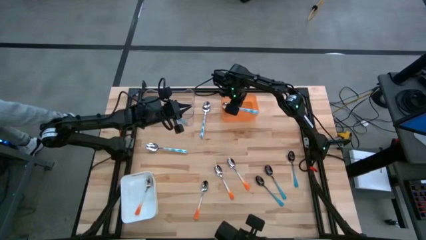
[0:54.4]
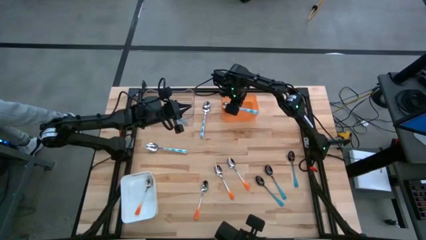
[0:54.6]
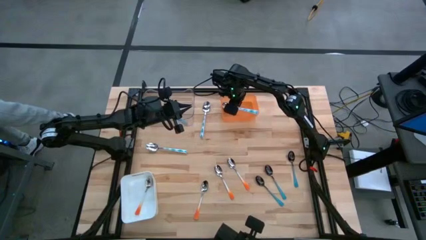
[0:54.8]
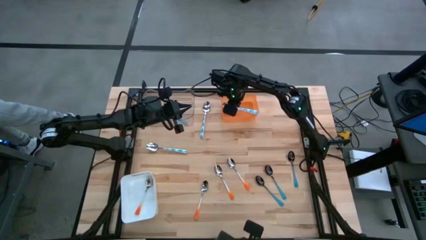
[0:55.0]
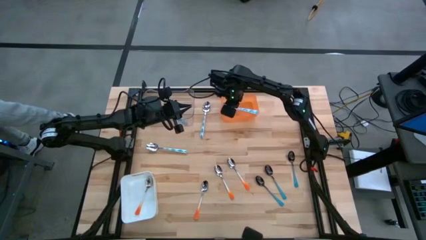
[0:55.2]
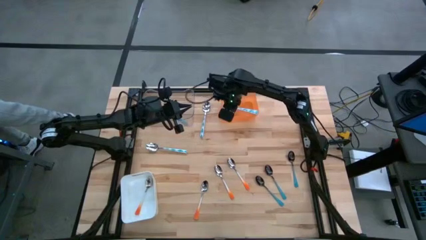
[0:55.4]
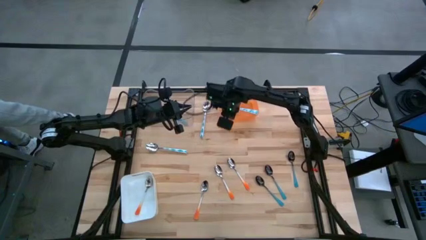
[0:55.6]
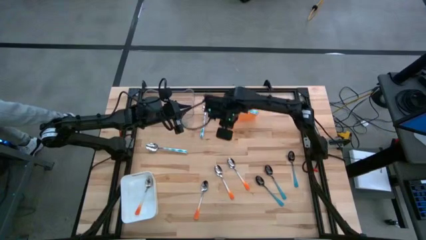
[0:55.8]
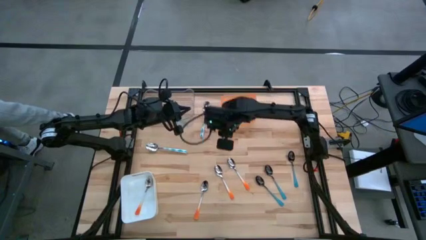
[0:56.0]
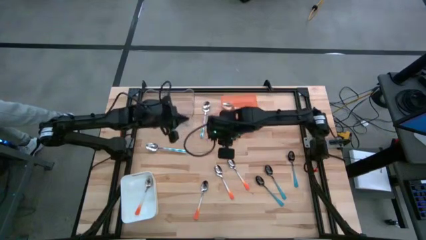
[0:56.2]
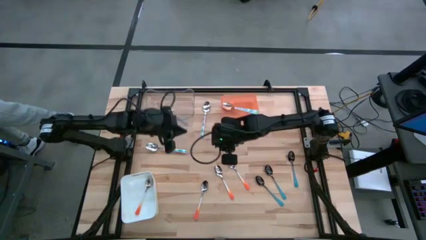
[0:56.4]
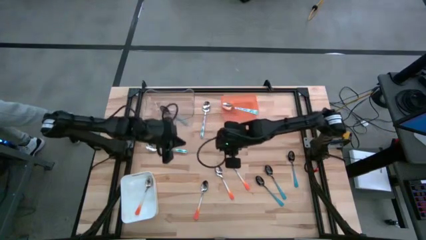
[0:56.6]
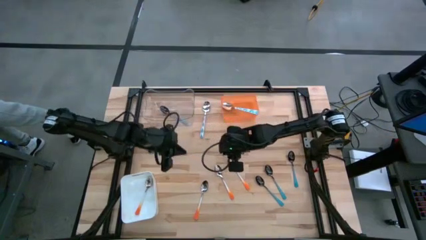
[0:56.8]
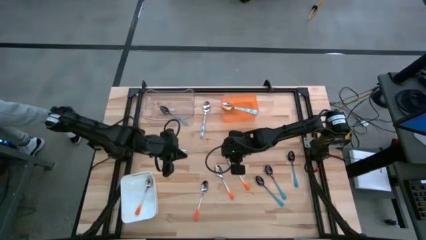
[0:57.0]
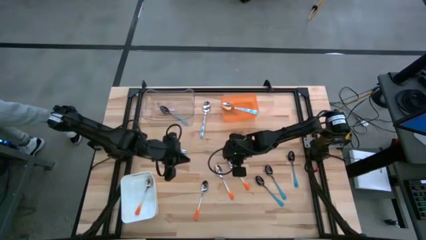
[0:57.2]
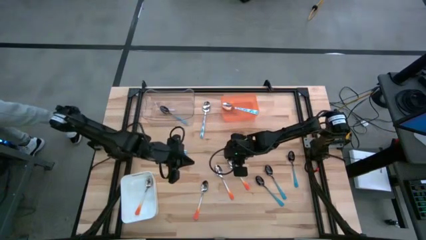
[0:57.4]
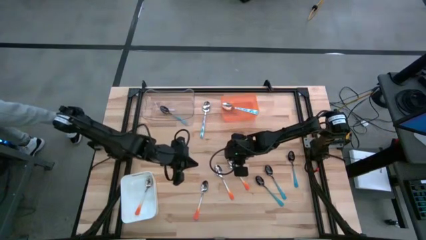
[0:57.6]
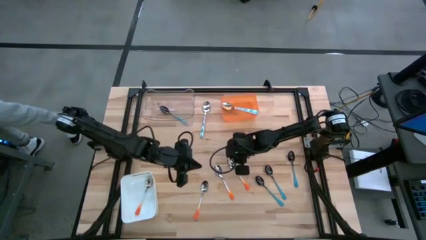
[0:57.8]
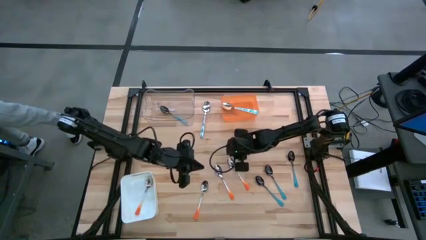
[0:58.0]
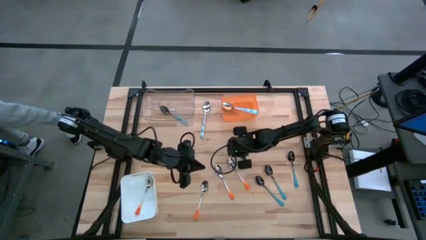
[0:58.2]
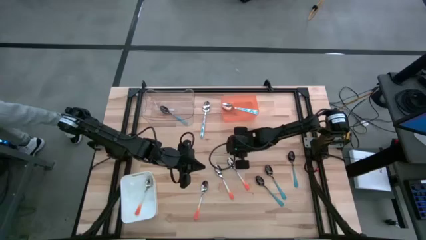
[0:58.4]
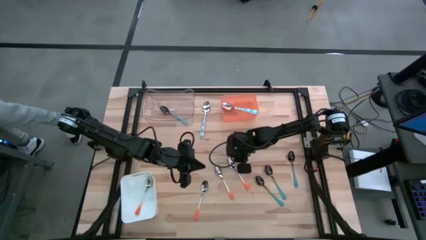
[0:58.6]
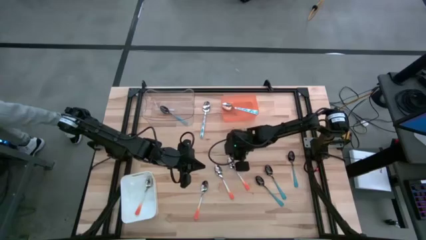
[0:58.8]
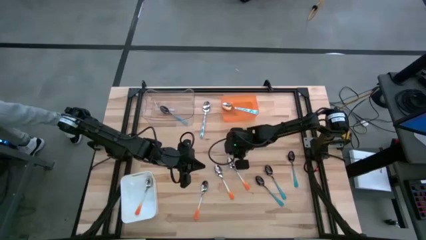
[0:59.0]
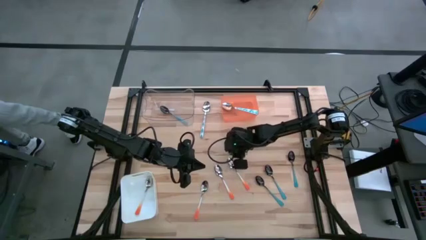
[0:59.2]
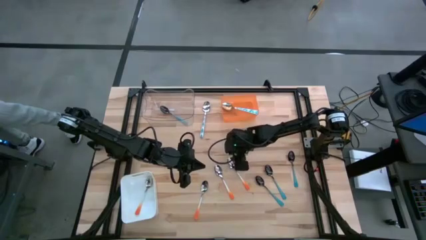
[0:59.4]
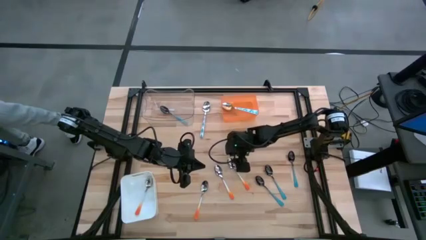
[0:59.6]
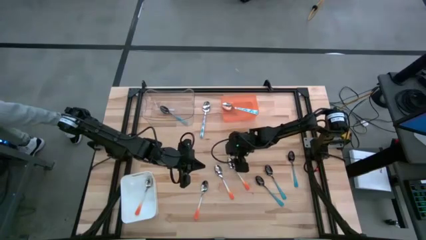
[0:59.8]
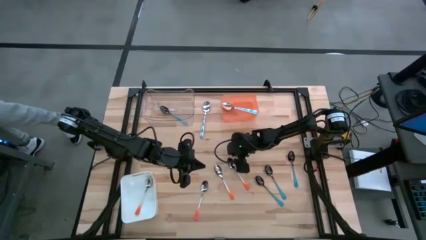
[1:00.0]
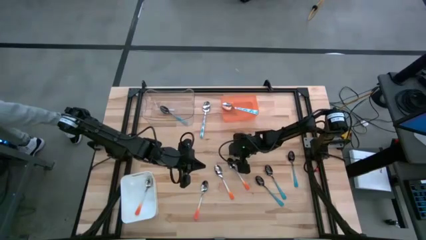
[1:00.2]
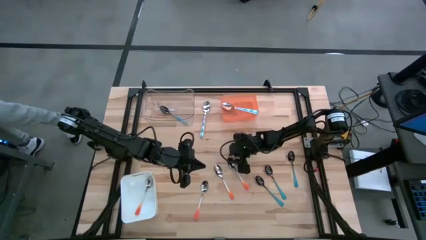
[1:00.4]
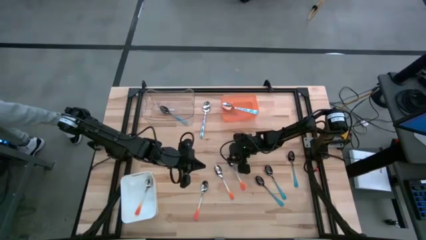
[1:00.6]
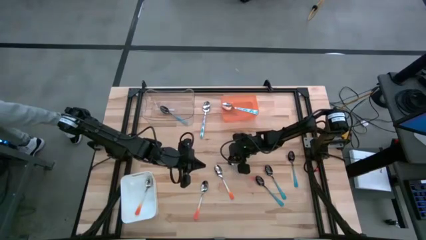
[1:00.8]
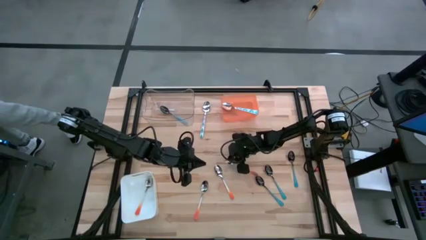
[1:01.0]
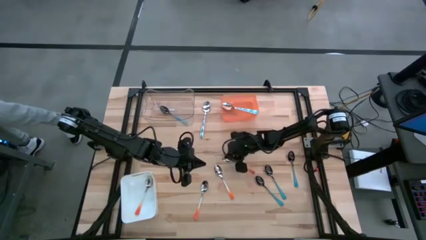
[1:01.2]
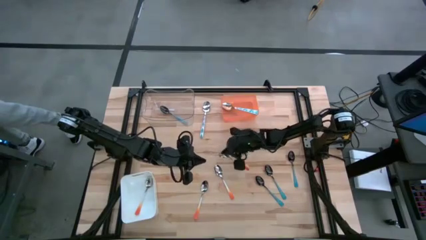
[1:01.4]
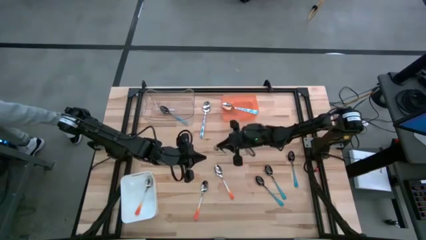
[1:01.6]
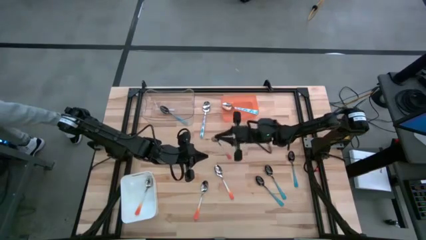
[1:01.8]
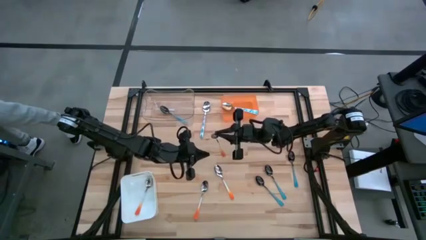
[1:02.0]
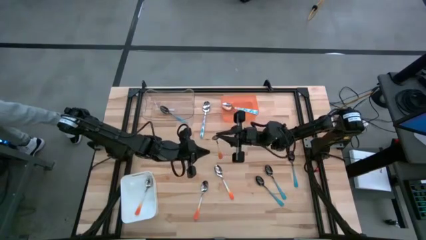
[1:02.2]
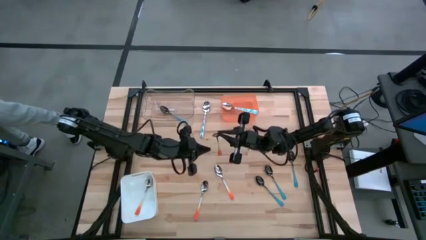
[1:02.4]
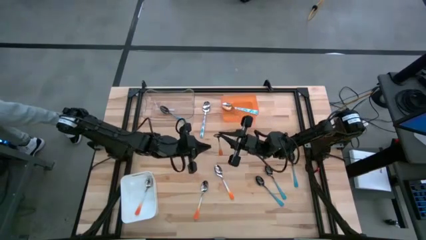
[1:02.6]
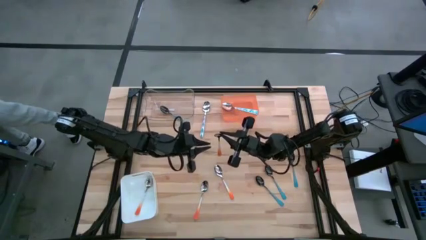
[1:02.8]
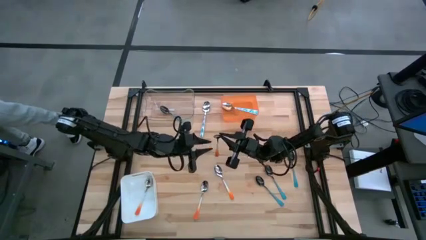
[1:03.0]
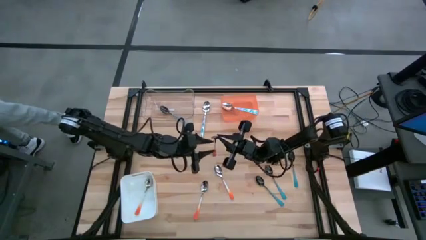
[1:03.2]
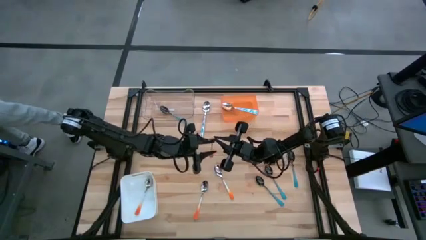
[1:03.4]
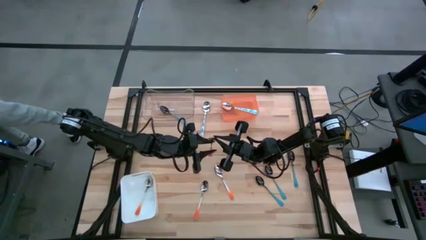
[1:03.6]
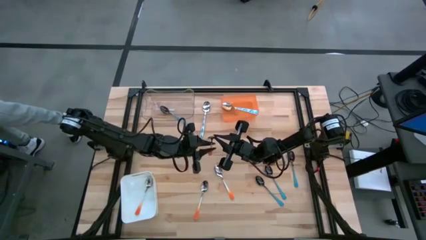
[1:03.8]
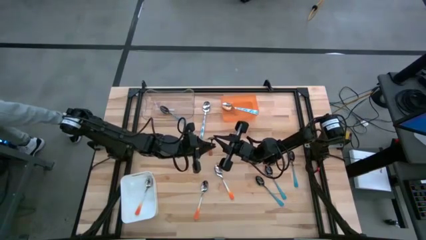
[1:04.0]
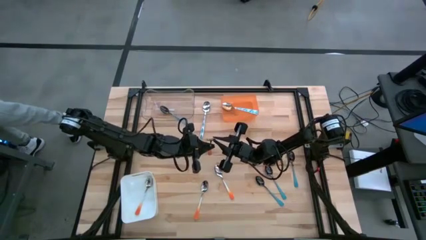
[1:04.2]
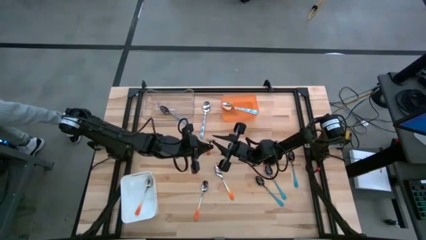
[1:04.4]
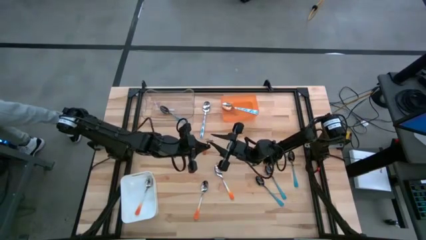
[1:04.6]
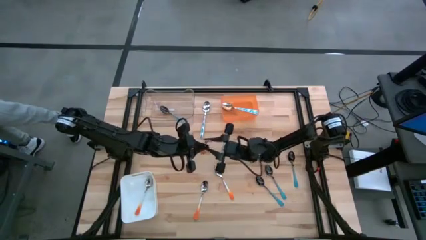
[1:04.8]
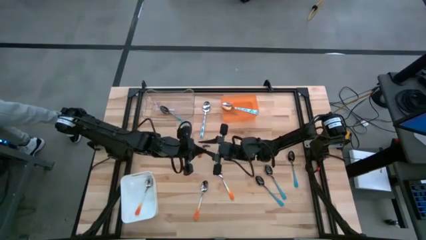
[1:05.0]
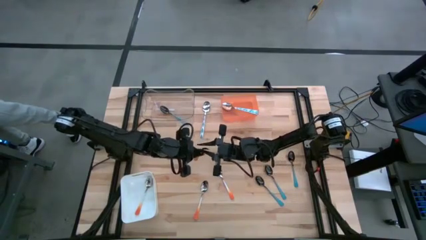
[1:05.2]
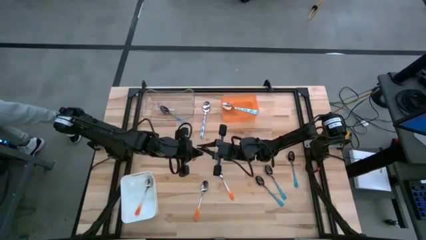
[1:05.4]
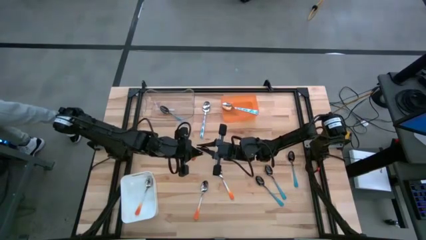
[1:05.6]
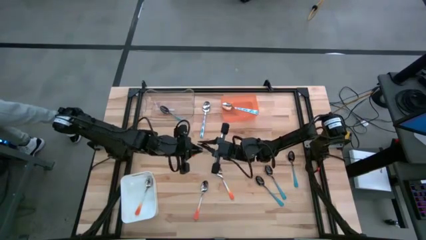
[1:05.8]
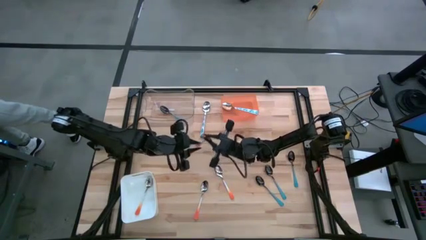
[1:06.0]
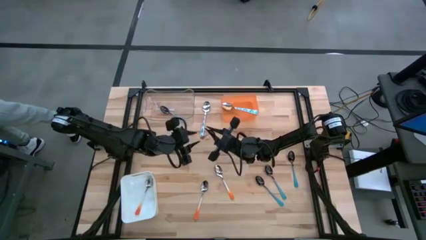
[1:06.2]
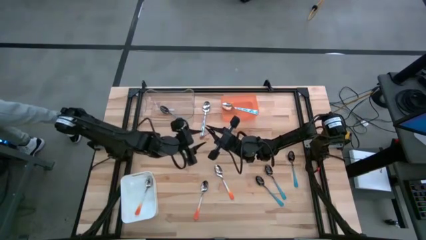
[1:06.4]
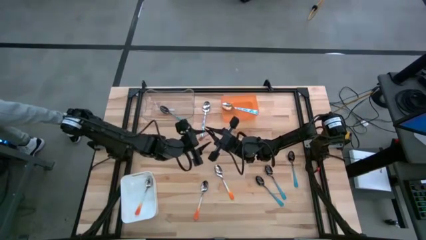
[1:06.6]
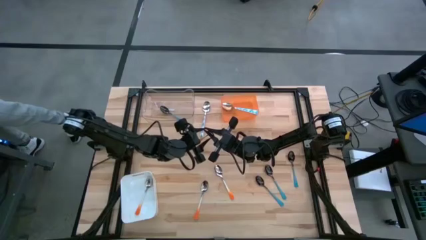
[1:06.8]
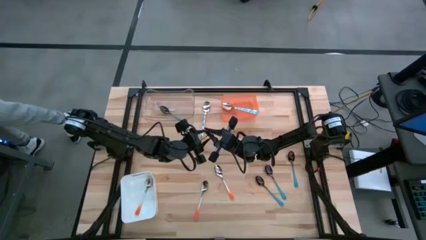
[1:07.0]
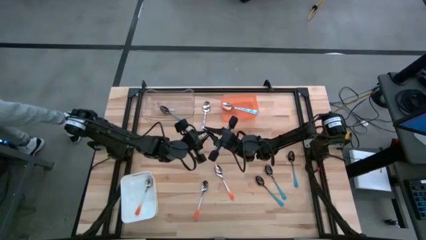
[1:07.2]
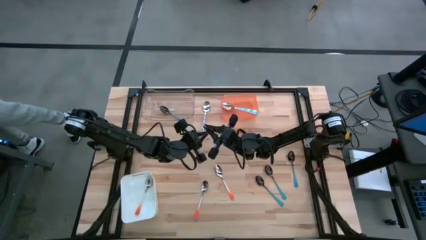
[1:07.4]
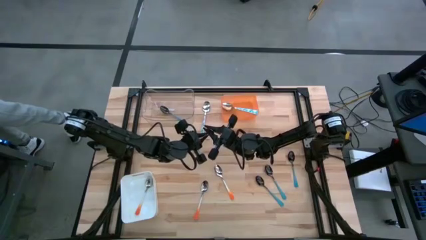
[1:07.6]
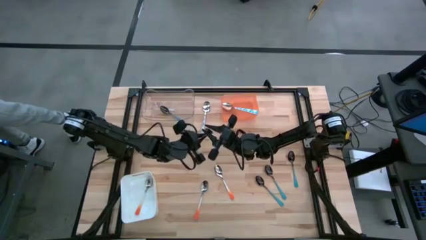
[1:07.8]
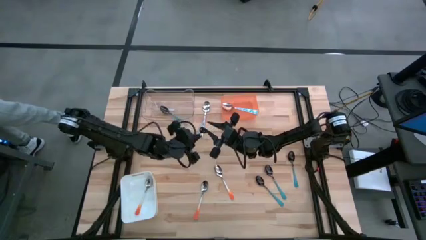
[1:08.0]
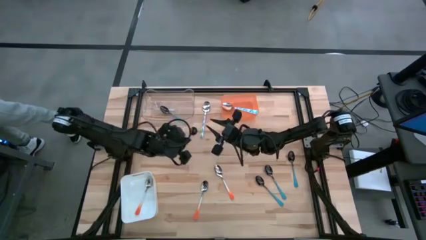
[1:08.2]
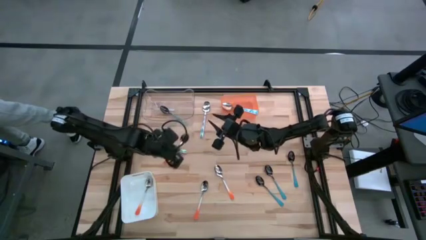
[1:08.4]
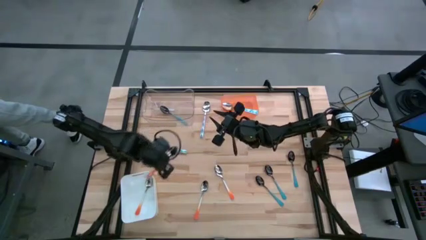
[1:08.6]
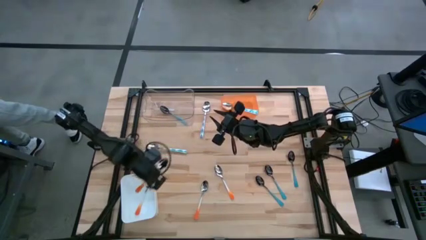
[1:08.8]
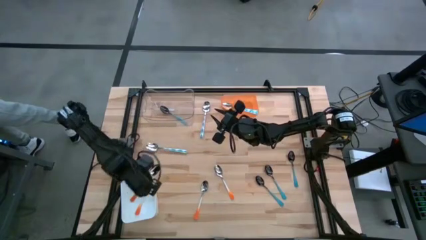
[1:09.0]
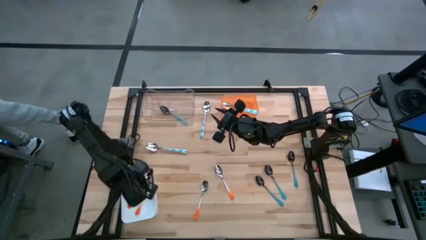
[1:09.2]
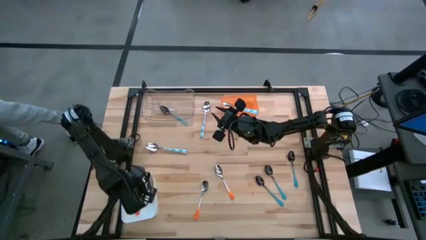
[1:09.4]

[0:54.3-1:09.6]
Task: Sort silverware by color (type)
Put the orange spoon into the white bin

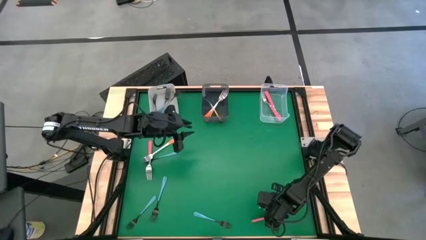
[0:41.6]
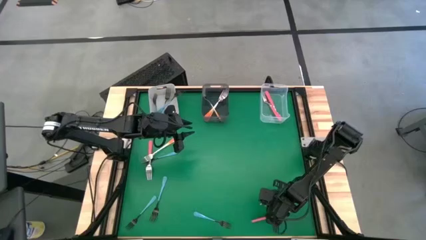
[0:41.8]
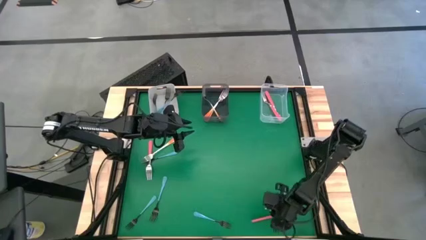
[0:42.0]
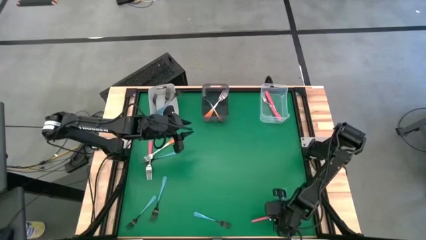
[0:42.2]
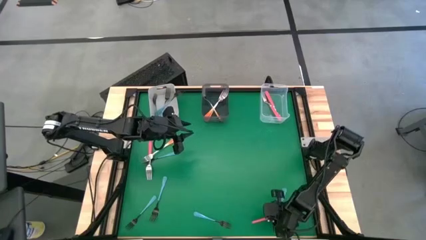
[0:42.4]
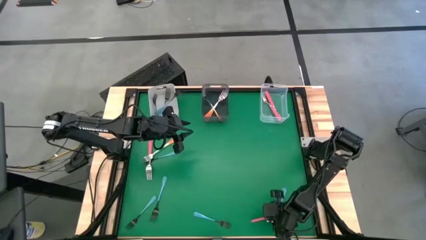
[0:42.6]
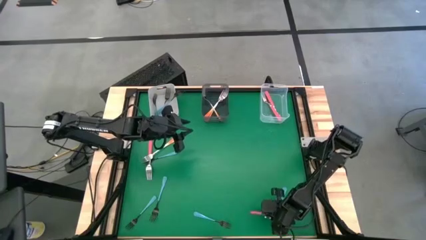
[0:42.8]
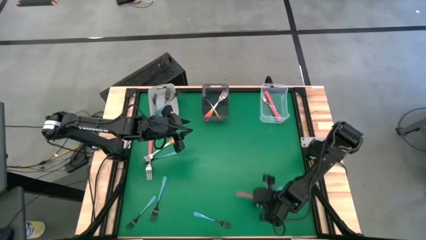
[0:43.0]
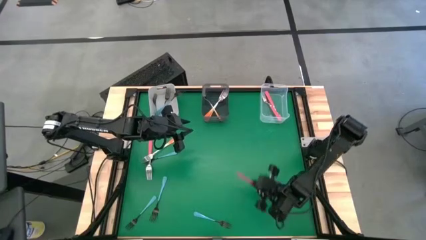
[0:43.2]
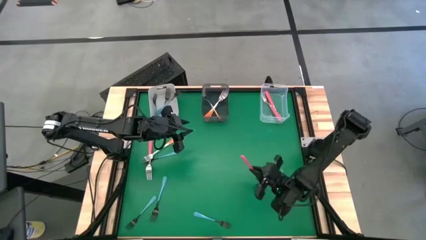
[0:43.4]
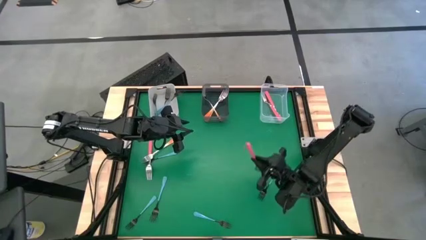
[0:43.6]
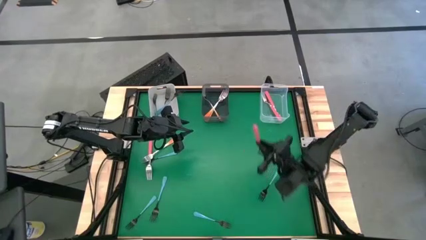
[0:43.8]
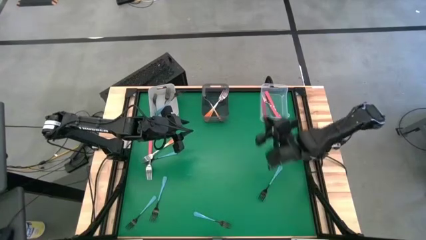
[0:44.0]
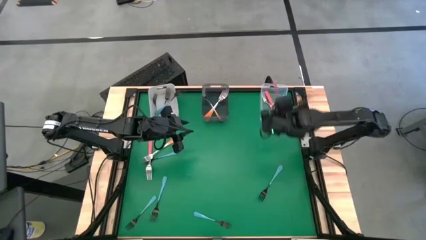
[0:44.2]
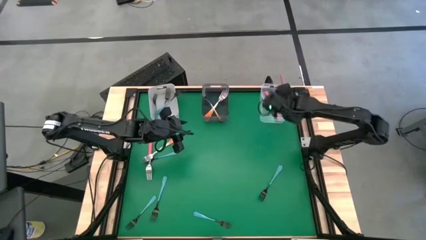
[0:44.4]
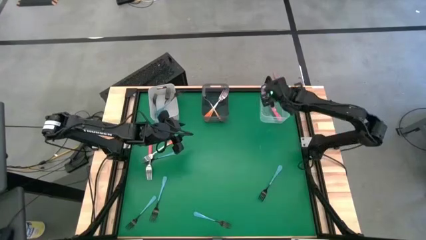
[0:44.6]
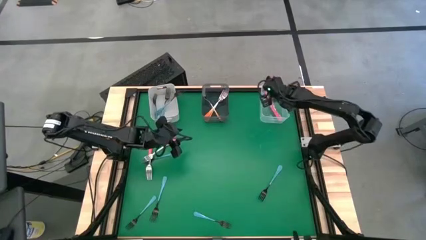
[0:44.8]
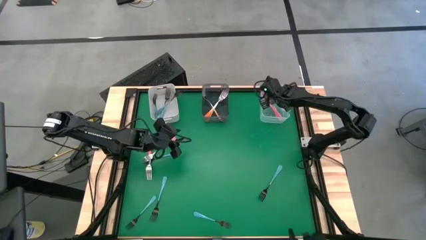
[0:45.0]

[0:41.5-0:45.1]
Task: Sort silverware by color (type)
Put the pink fork into the transparent bin
